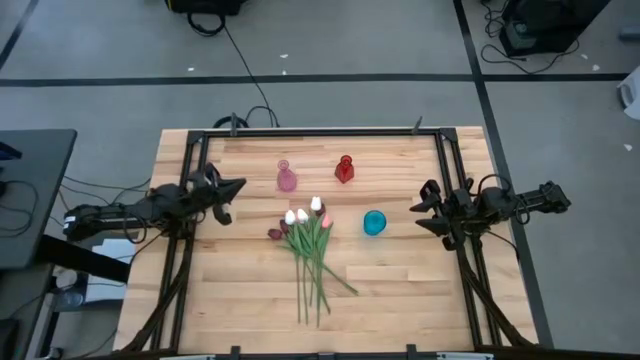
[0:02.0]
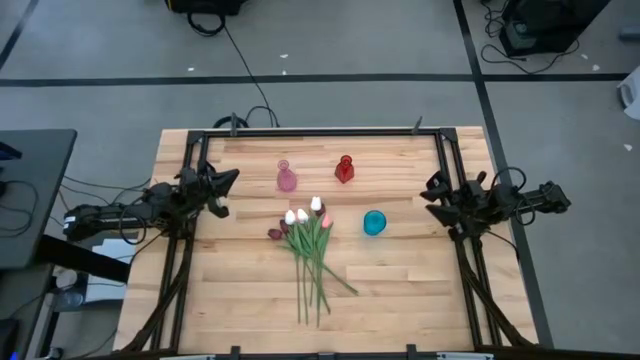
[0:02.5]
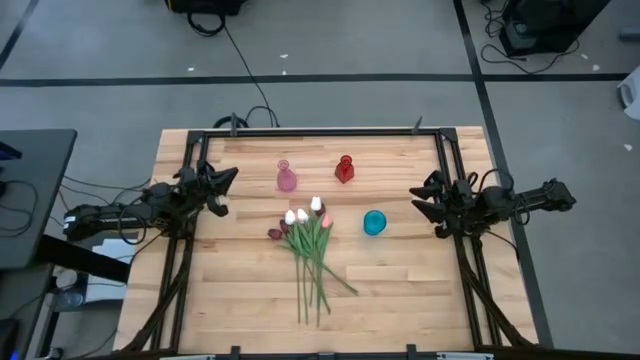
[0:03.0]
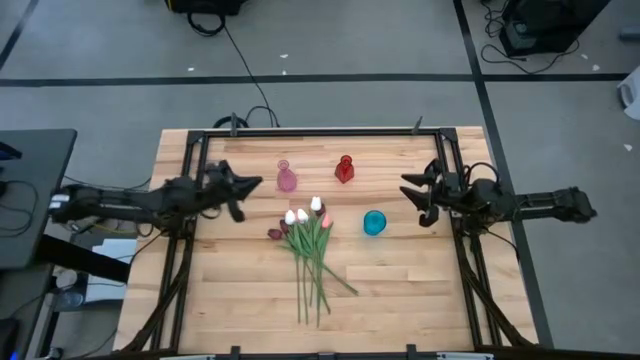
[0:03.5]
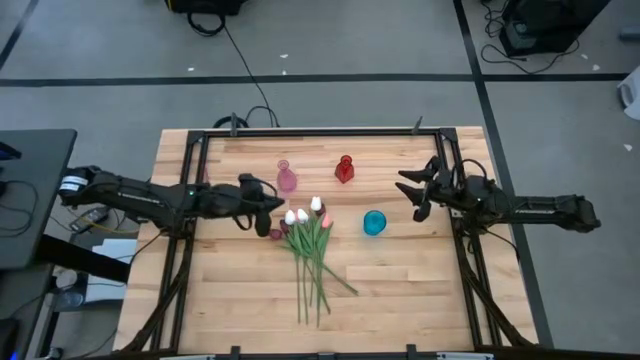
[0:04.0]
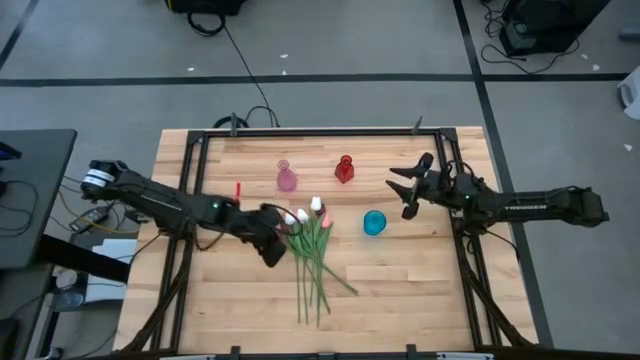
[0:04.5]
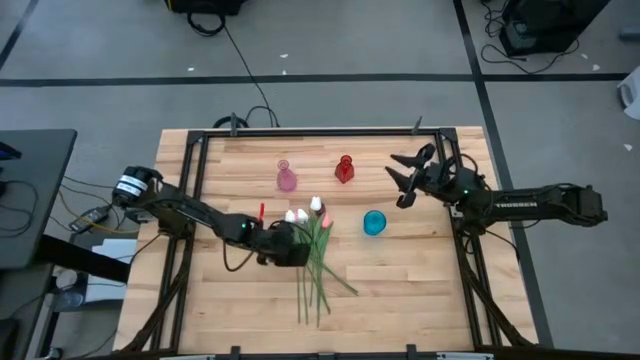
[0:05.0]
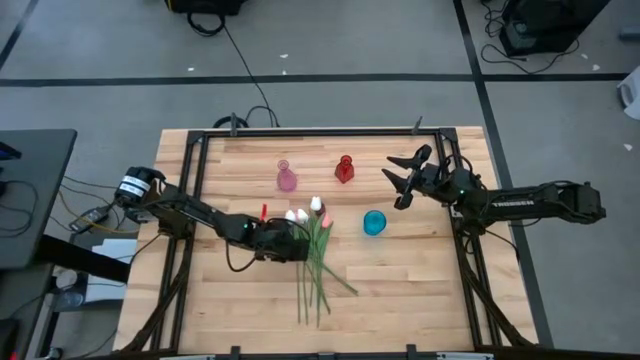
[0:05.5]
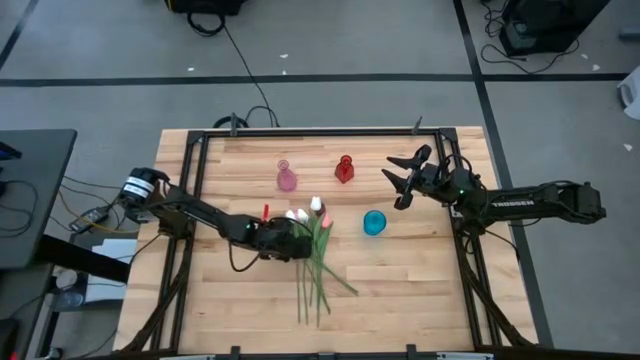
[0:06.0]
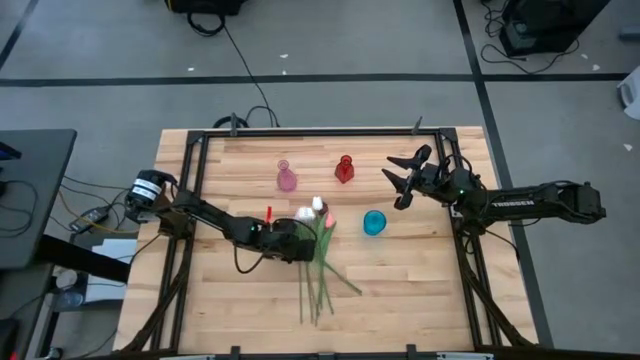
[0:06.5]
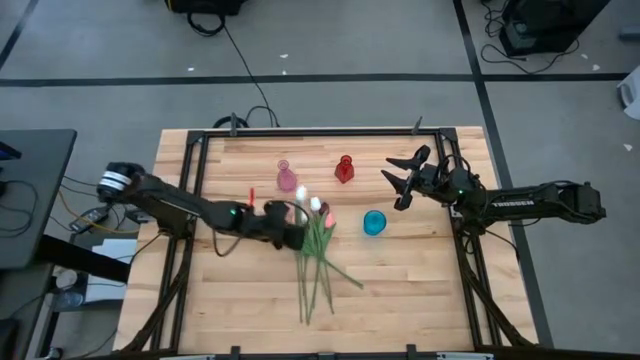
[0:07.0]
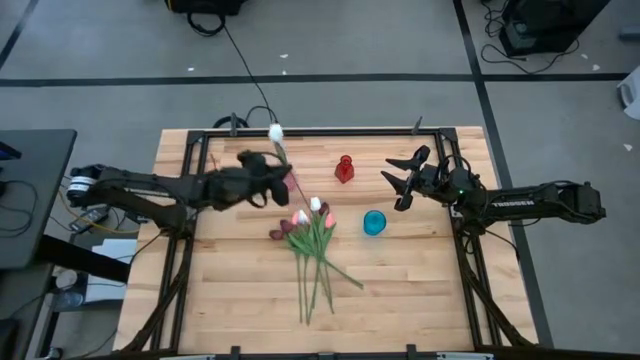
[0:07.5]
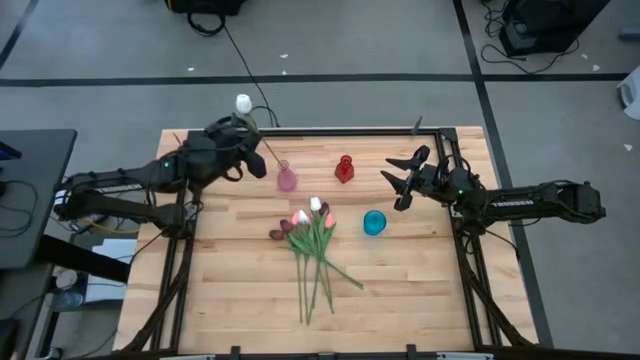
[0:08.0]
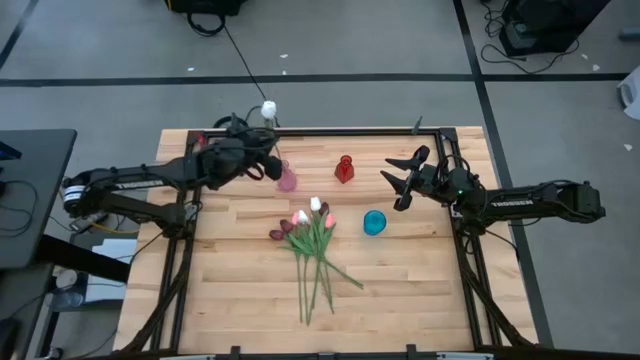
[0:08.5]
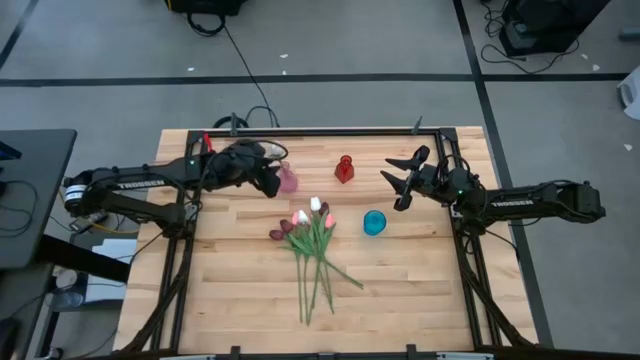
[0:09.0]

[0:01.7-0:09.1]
Task: Sort flowers into vase by color
Put the white tulip into the pink vase

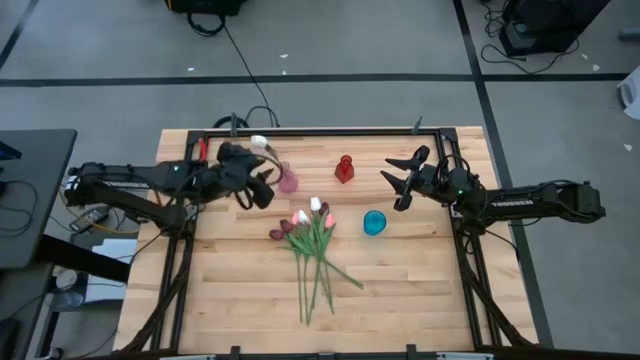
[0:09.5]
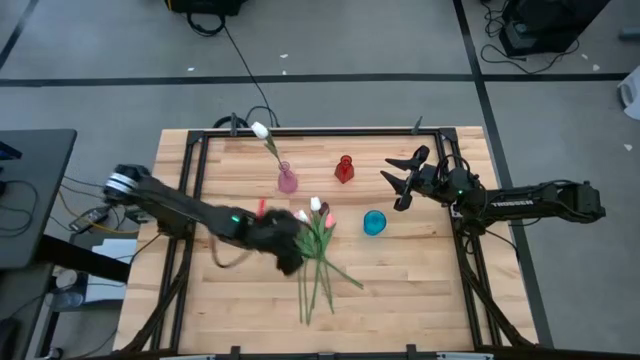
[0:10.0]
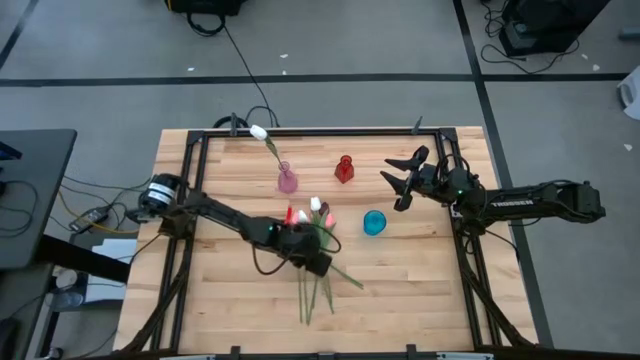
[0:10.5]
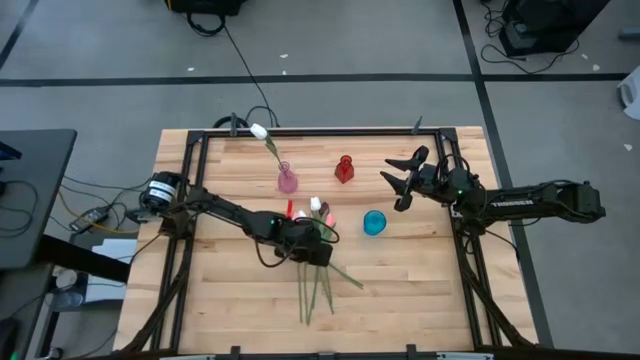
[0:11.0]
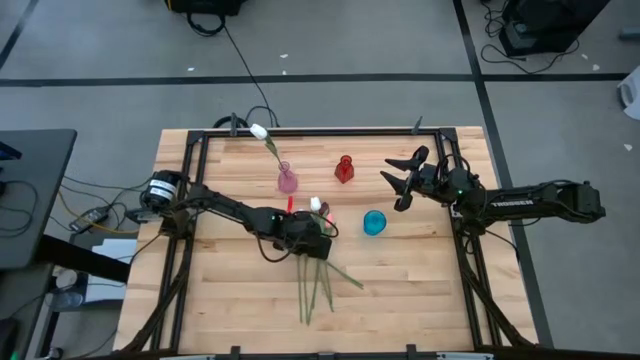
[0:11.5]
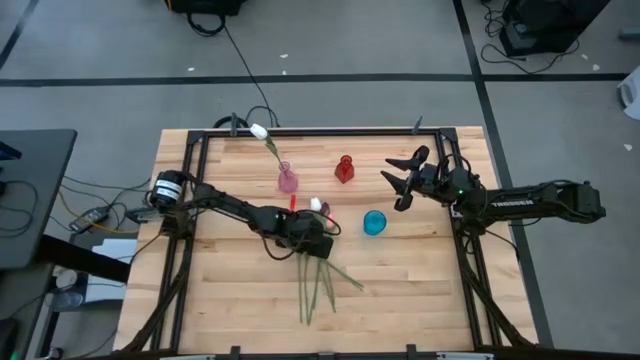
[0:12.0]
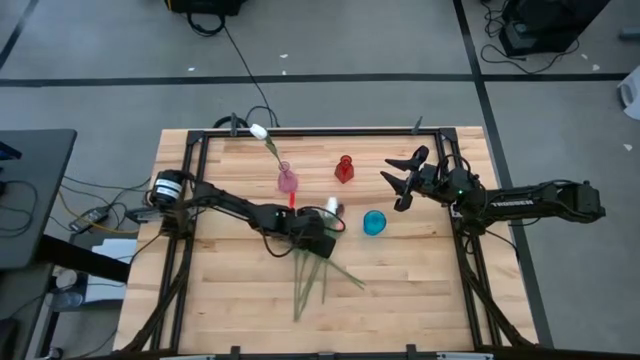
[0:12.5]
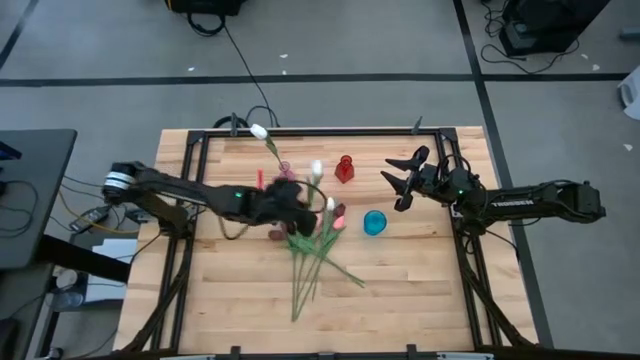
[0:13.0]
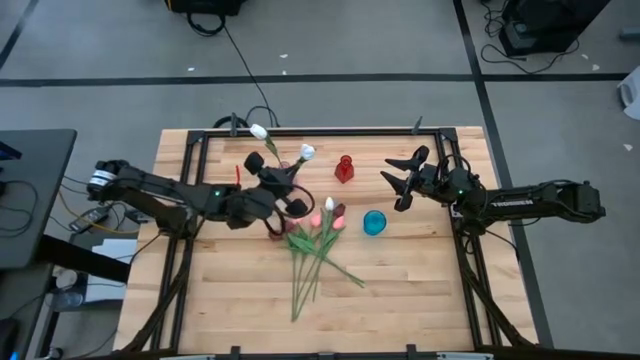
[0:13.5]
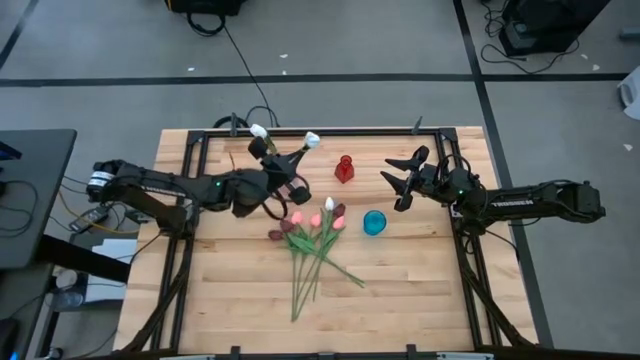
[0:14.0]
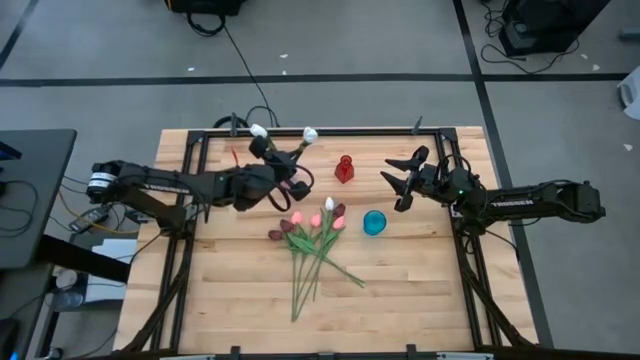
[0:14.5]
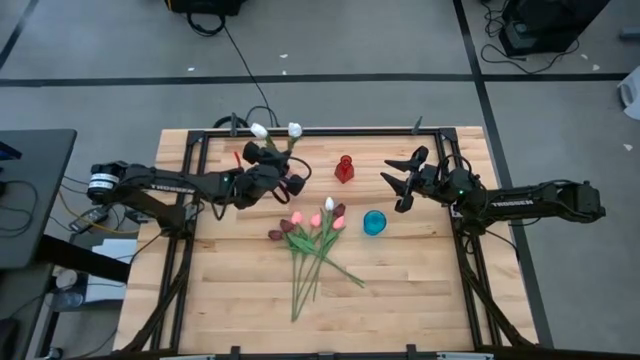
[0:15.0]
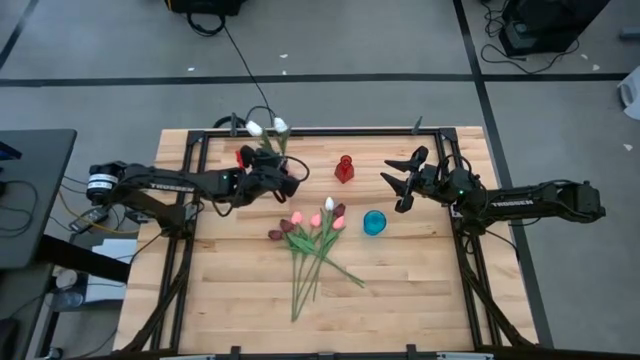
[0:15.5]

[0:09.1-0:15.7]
Put the white tulip into the pink vase

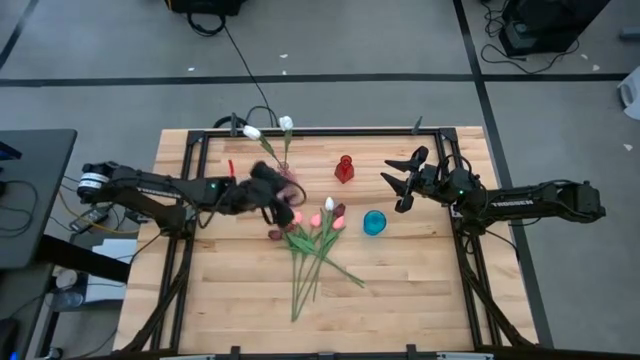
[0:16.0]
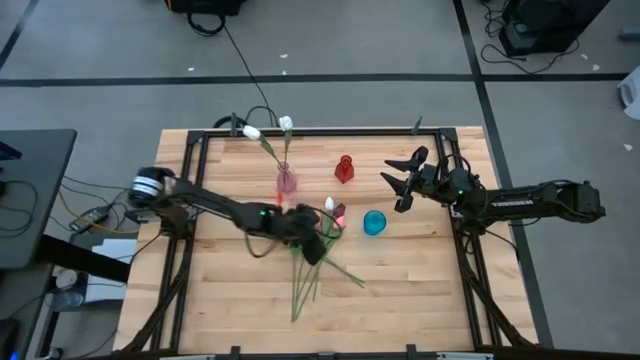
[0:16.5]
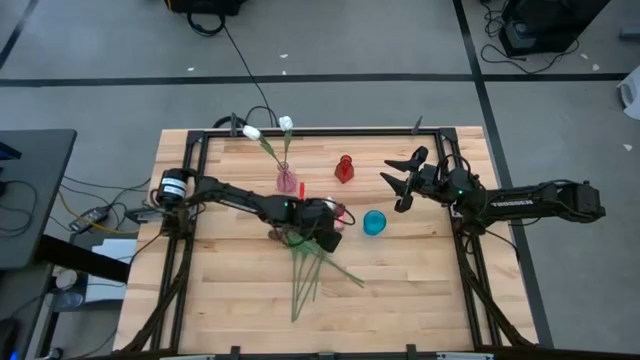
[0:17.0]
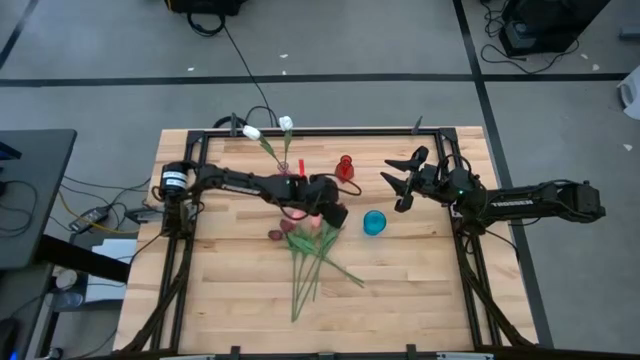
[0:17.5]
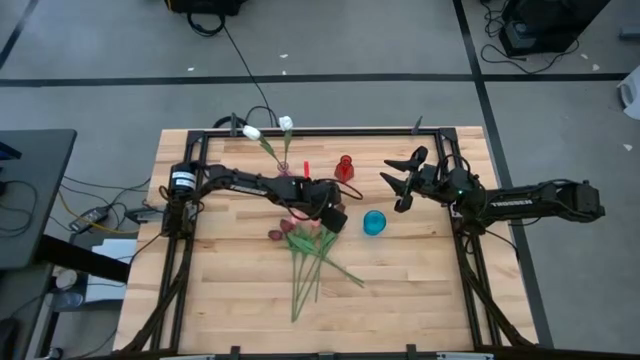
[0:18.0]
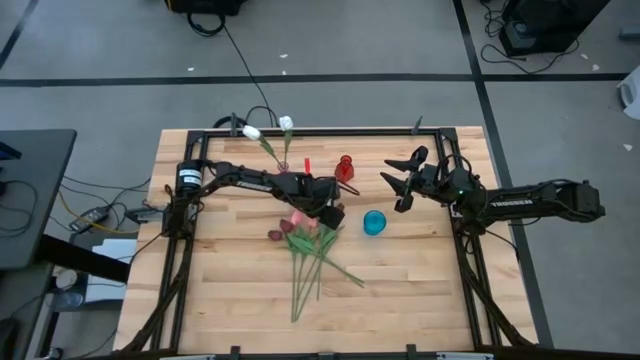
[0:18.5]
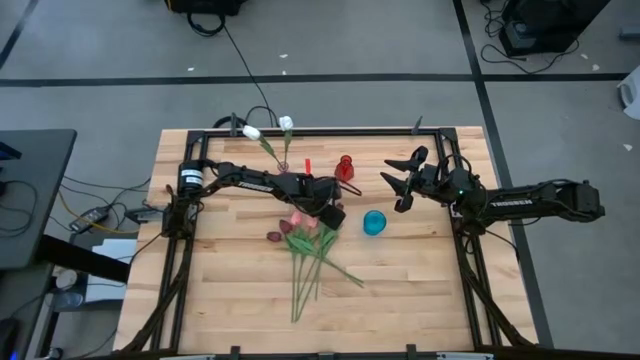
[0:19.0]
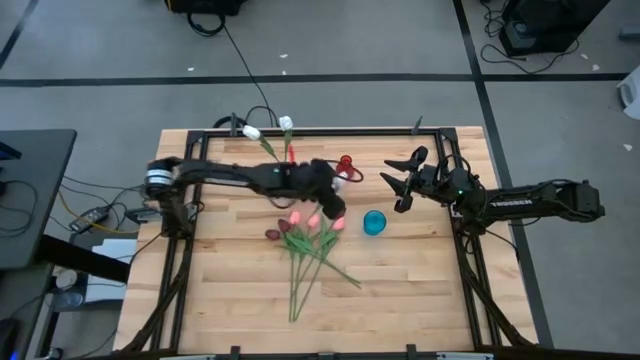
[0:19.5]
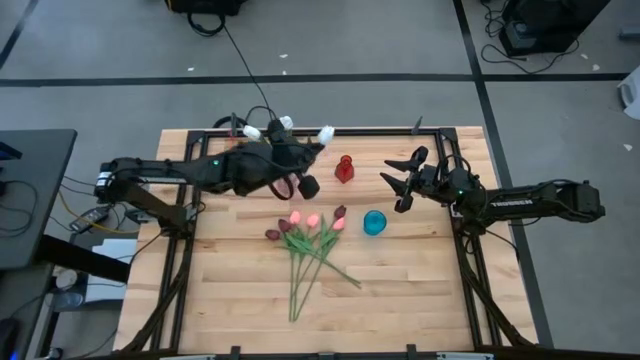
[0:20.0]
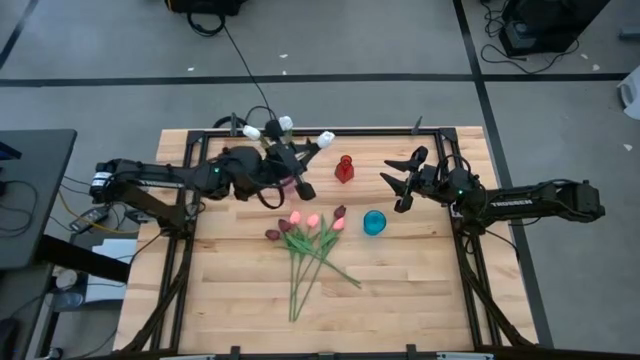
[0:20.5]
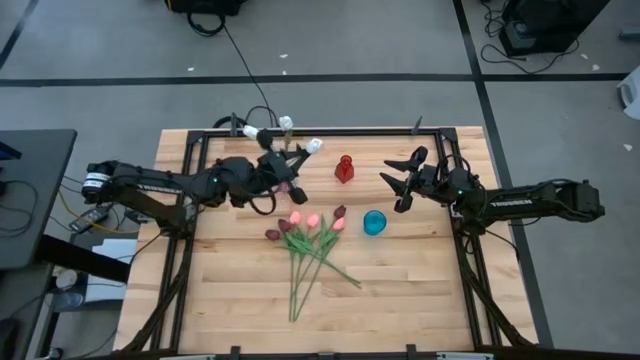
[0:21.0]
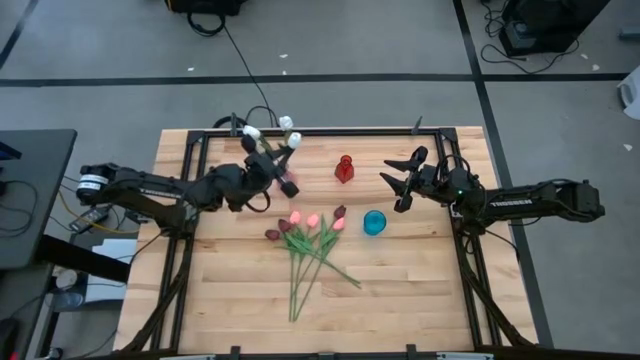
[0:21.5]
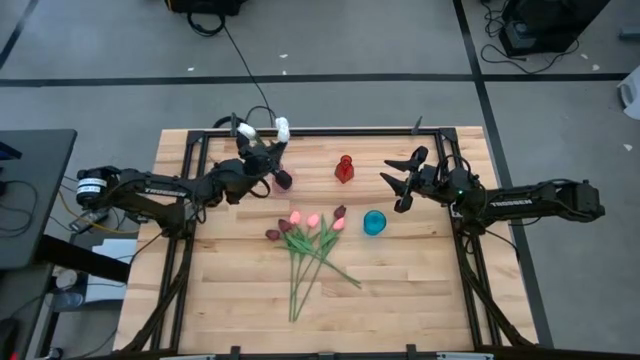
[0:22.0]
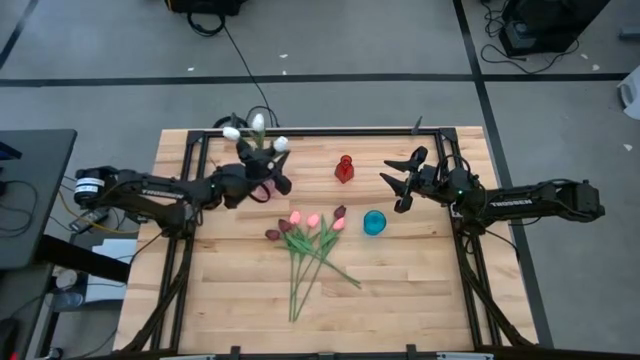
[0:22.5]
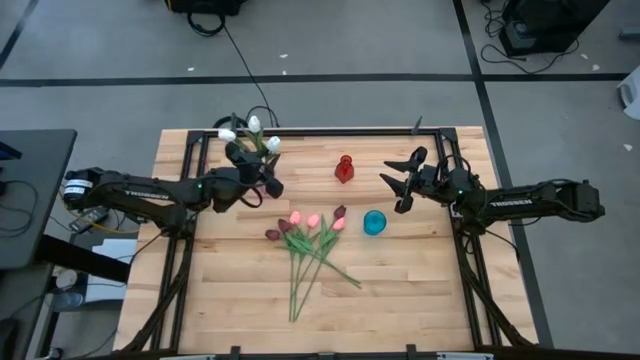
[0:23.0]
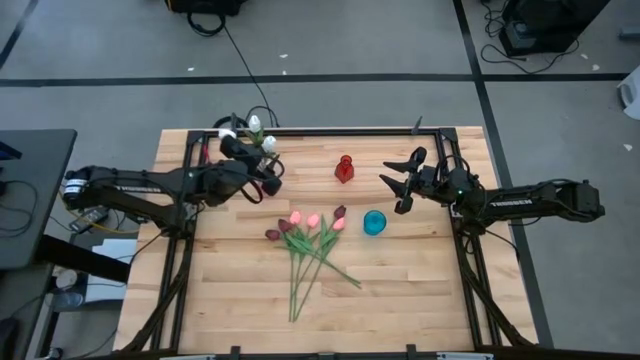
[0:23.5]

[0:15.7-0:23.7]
Put the white tulip into the pink vase
